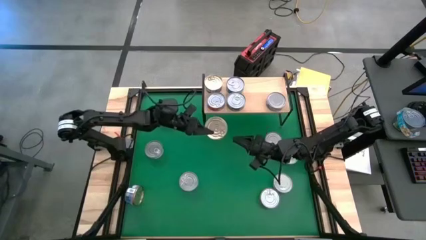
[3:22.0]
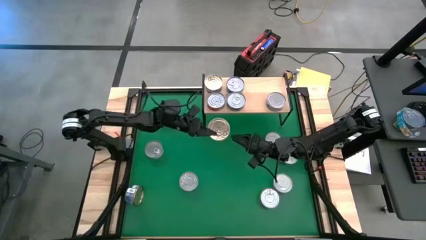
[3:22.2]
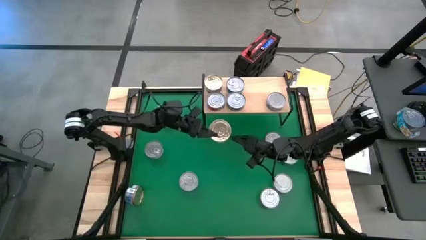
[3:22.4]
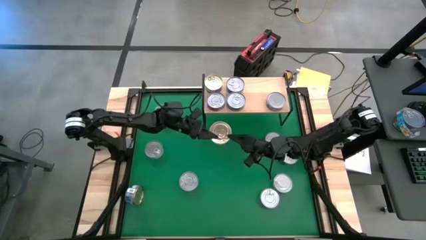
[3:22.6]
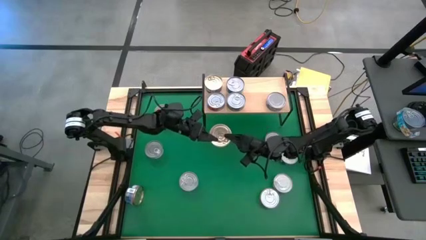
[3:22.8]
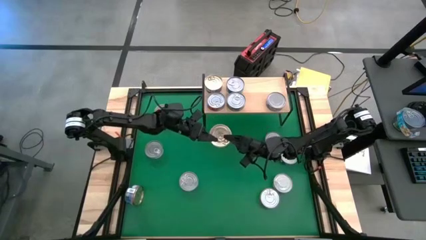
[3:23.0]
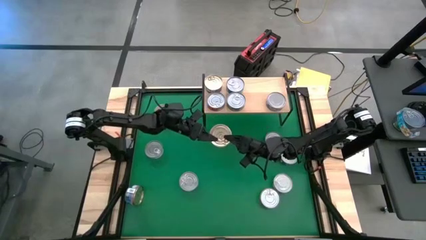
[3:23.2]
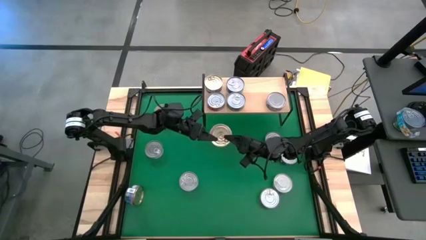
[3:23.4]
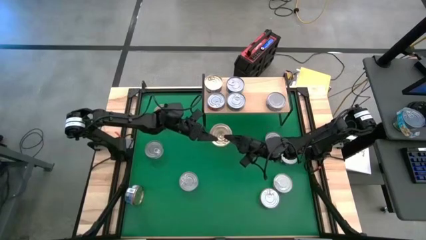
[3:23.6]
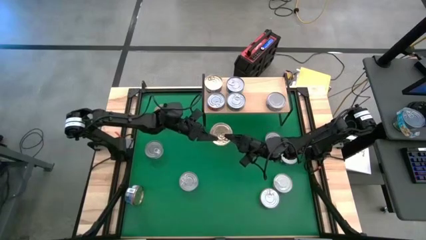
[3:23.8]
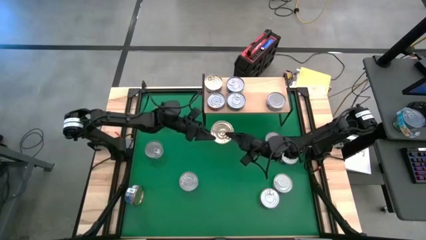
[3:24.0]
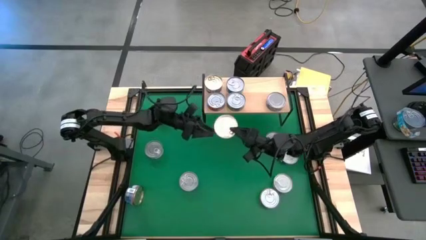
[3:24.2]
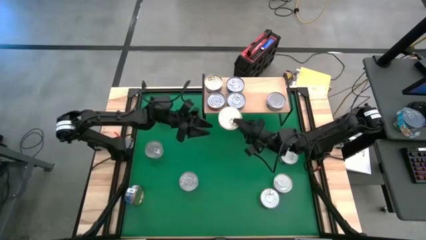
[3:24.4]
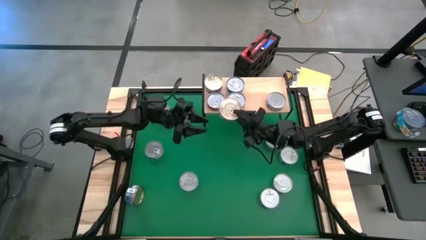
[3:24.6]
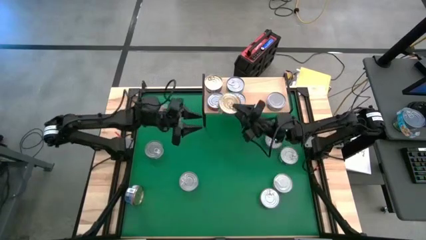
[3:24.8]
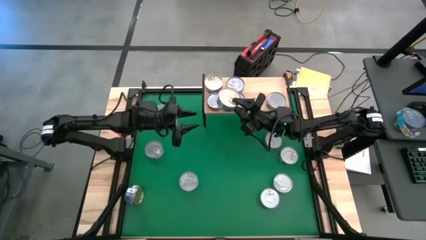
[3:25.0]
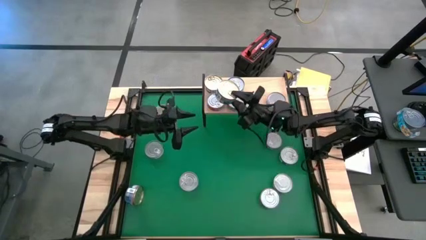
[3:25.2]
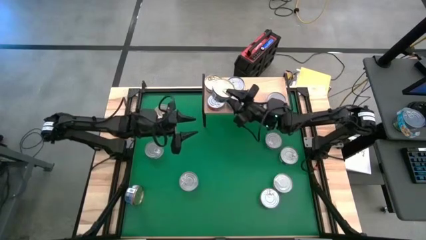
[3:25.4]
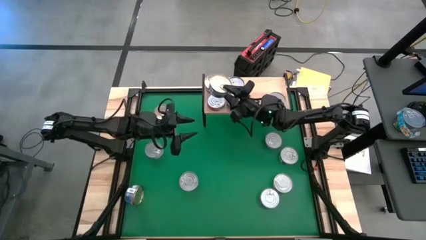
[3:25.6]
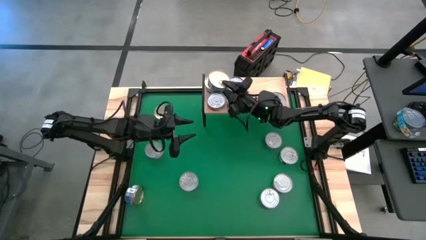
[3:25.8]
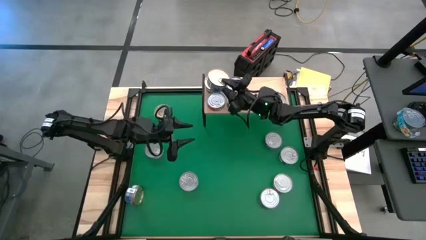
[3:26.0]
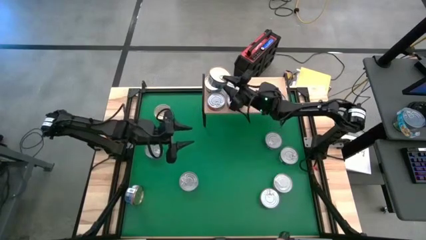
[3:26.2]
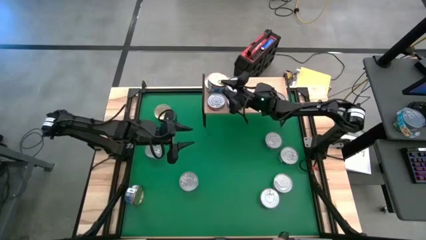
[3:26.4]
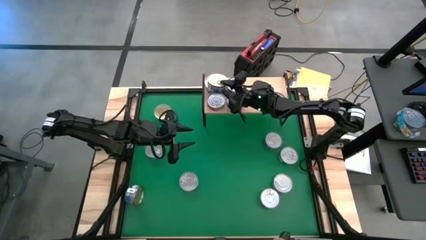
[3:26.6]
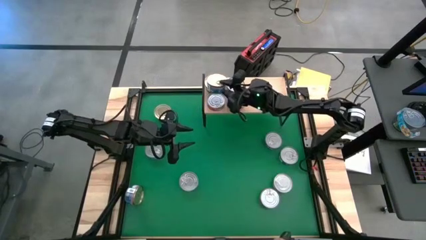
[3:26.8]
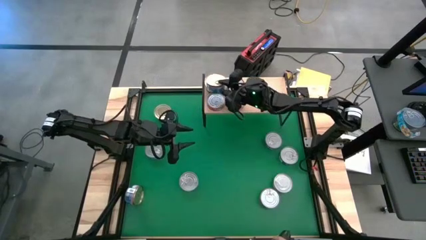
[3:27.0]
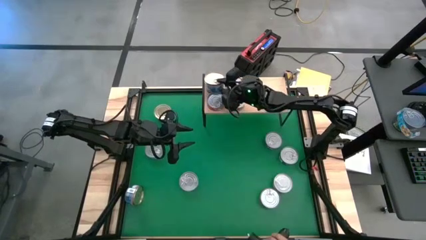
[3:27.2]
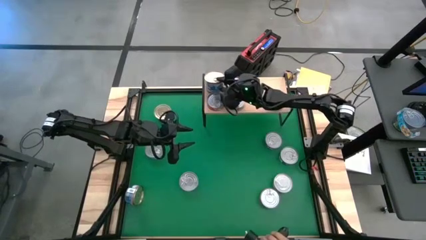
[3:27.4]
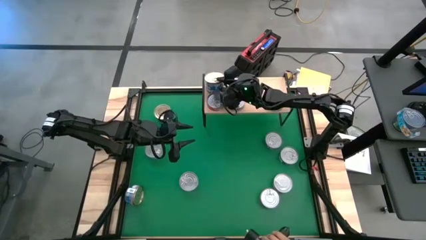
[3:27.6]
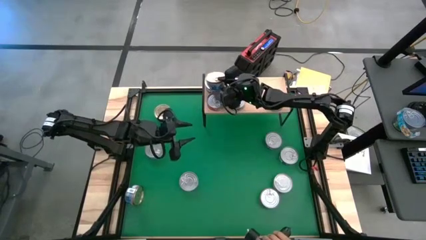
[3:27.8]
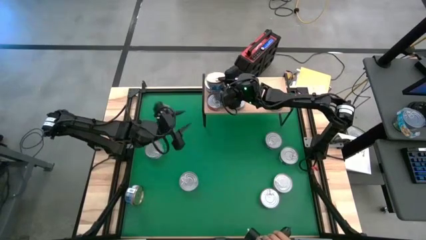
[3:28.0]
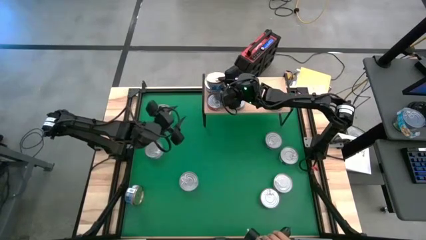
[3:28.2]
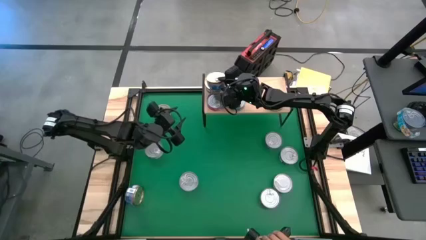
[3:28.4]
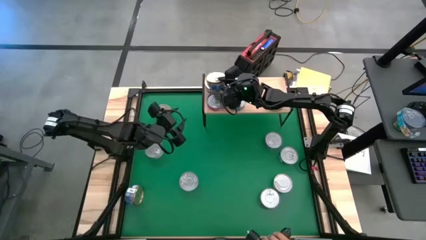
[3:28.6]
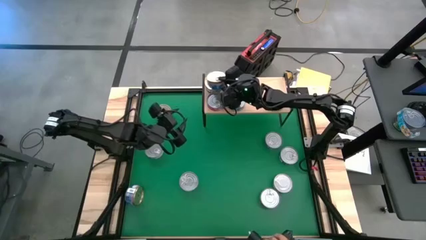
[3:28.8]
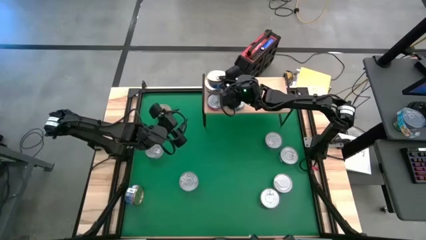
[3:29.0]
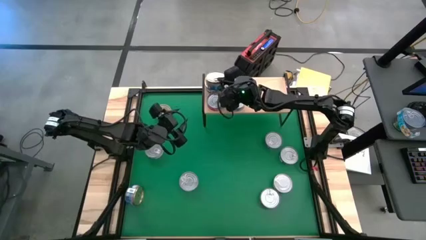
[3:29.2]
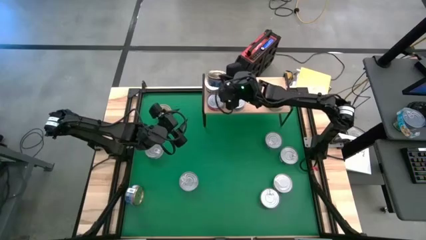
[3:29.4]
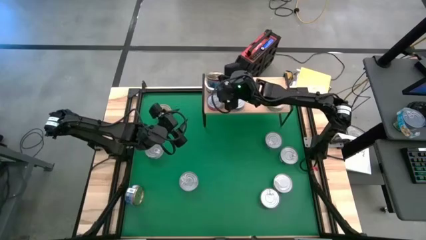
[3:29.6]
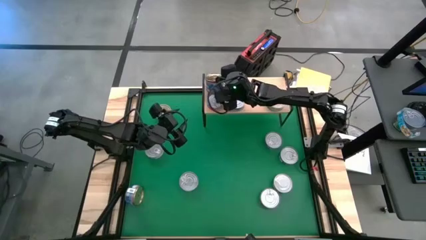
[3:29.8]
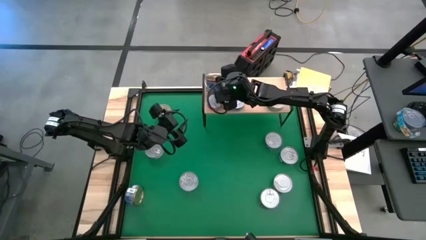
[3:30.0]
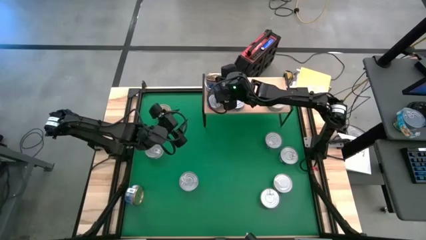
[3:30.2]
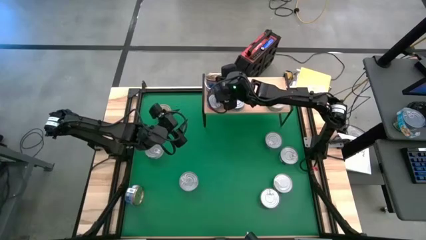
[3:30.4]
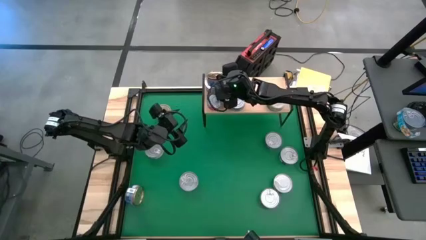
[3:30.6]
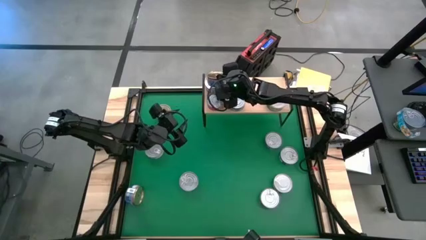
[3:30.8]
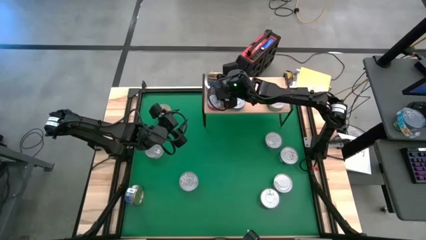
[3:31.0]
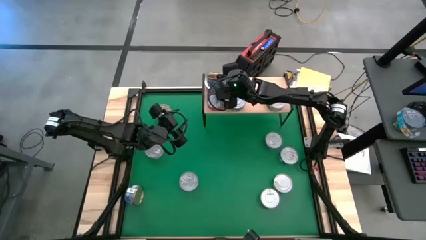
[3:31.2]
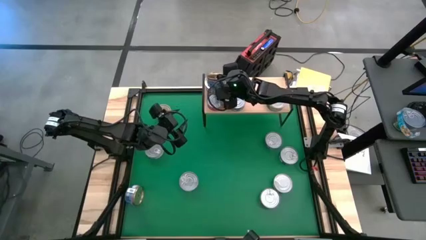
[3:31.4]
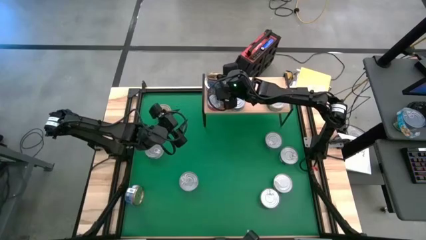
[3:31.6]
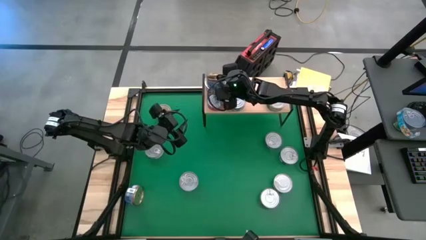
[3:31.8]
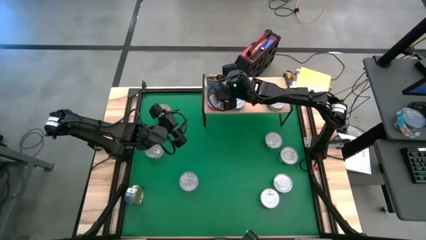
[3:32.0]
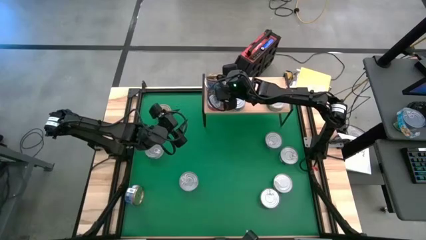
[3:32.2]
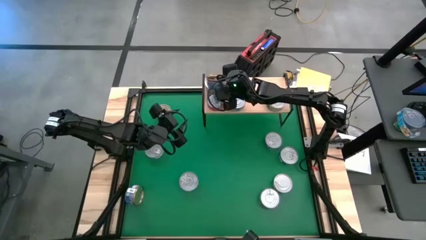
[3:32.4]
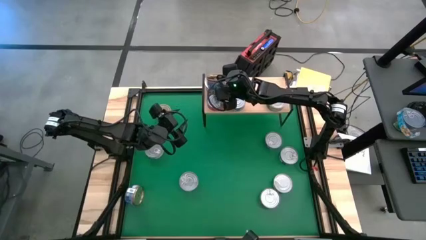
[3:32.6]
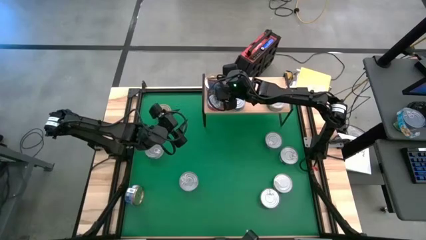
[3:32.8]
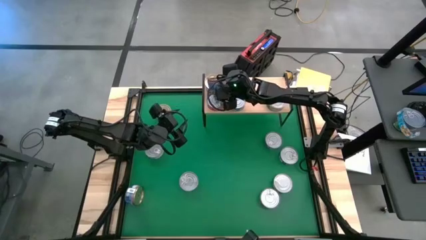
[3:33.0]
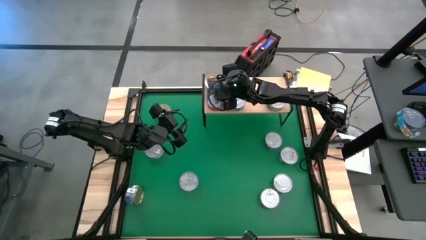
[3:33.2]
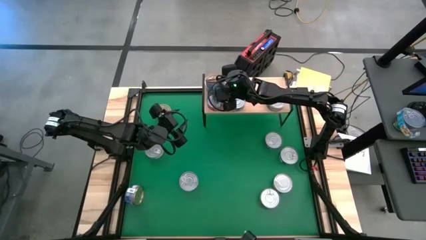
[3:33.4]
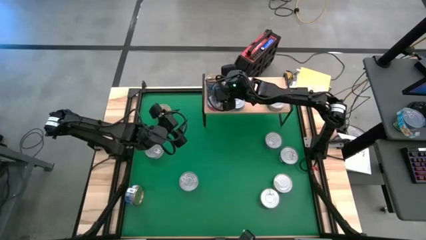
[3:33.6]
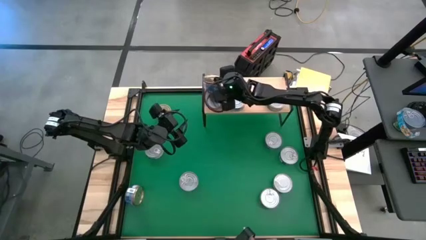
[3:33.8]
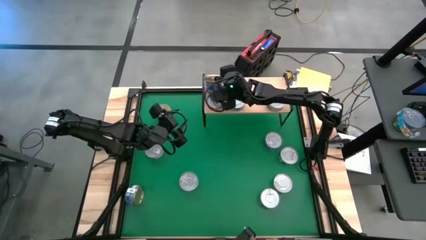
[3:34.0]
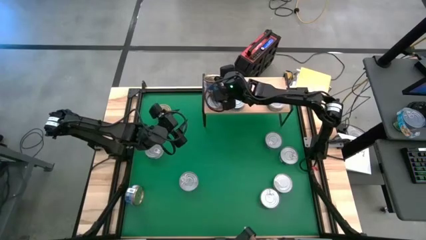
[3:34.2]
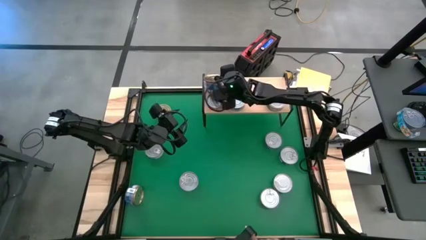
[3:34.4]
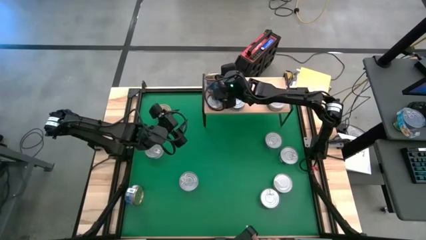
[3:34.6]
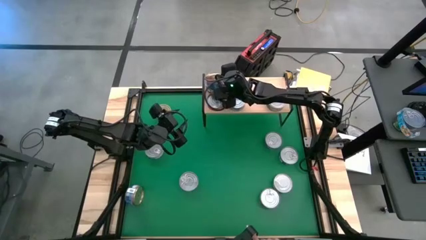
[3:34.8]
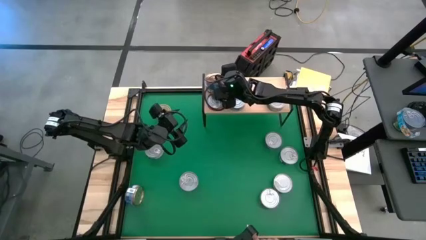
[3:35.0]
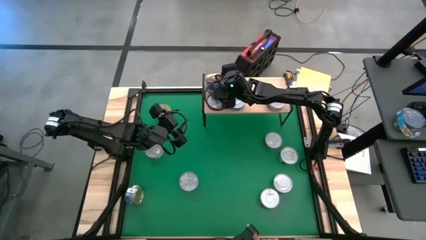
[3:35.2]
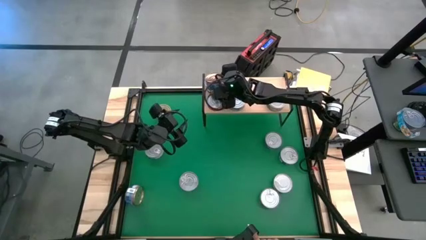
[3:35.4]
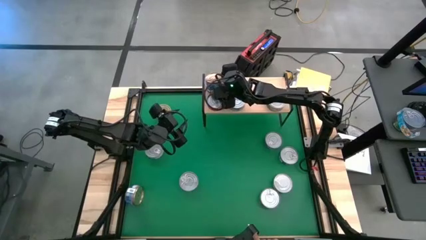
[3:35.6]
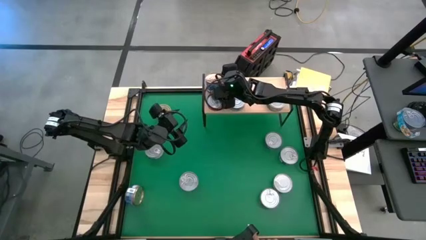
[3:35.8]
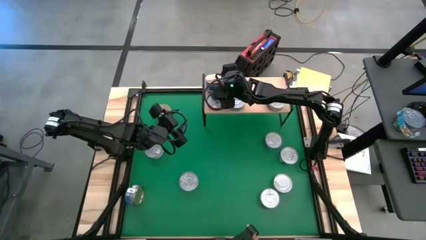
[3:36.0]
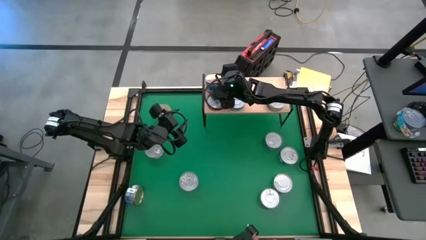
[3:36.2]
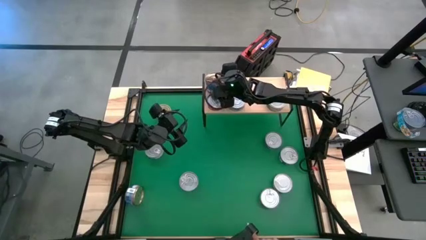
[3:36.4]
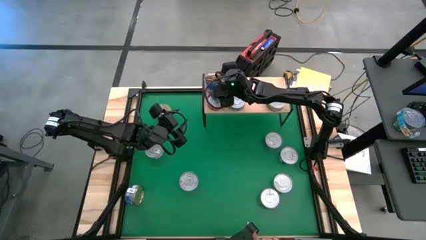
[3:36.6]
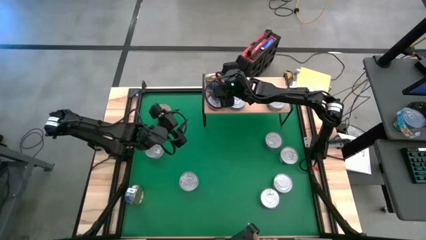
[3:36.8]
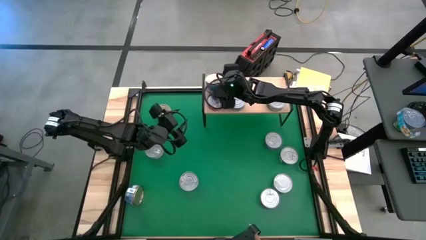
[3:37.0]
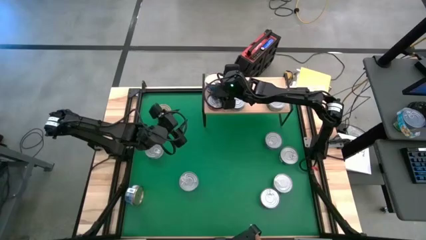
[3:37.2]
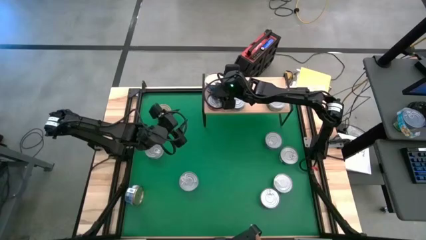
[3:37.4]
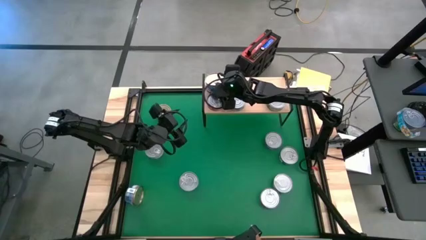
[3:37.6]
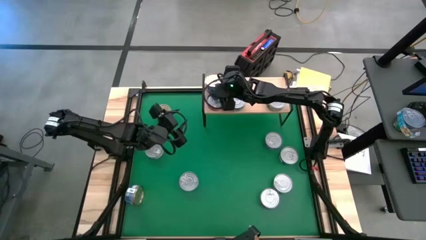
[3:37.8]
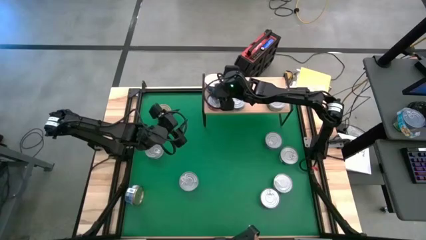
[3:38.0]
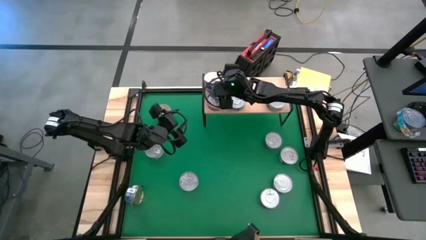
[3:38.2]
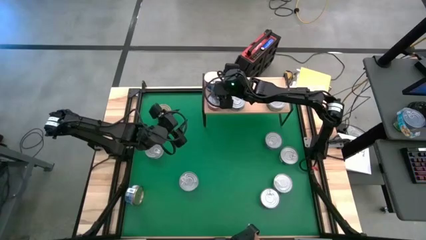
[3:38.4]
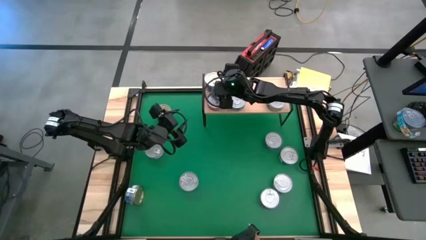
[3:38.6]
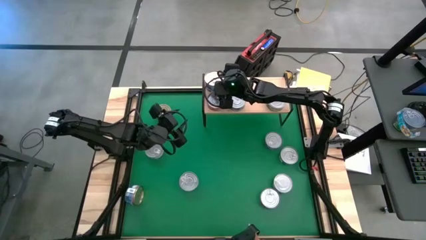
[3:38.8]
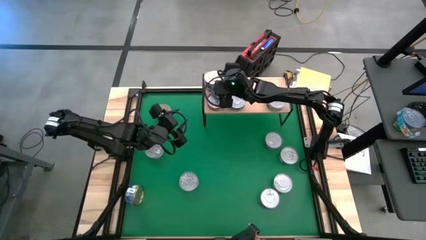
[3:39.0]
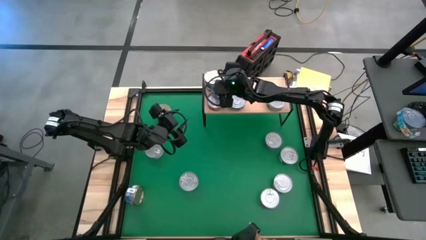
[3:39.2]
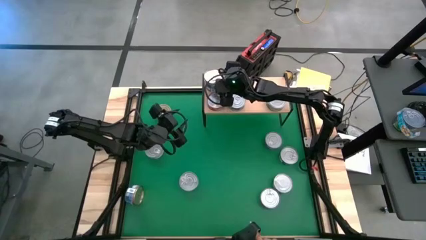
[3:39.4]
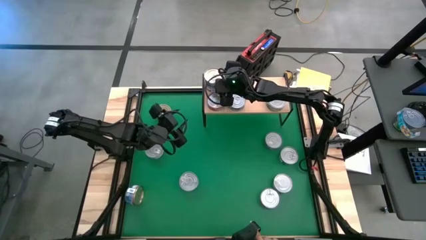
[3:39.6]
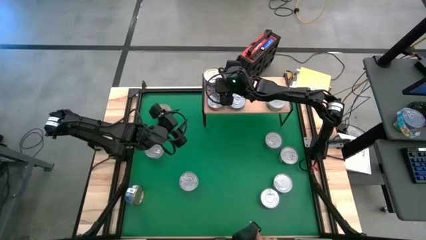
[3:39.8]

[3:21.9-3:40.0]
Task: Stack canned seafood by type on shelf
Stack the blue/pink tuna can on top of the other blue/pink tuna can on the shelf
